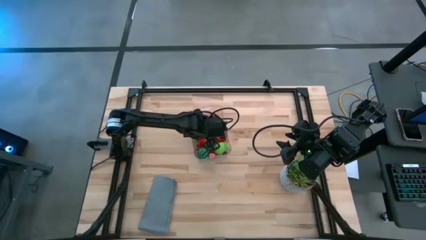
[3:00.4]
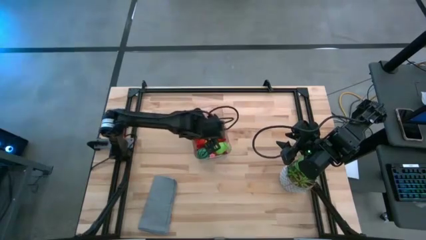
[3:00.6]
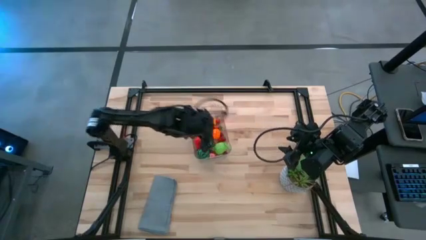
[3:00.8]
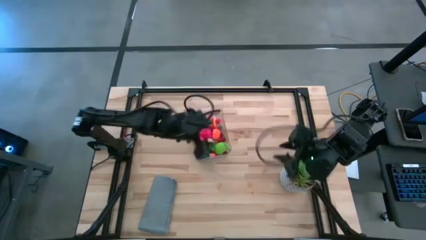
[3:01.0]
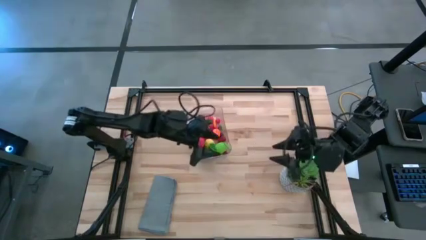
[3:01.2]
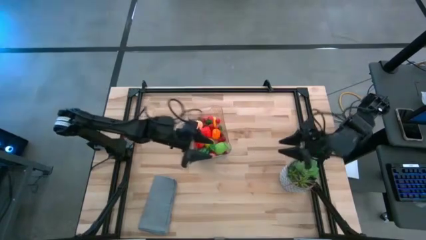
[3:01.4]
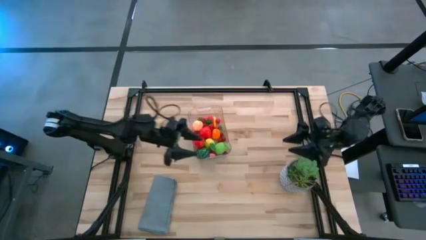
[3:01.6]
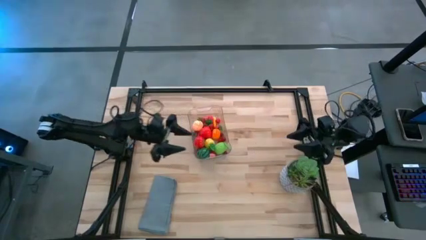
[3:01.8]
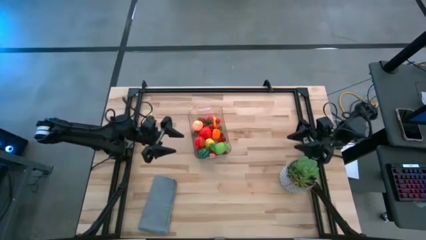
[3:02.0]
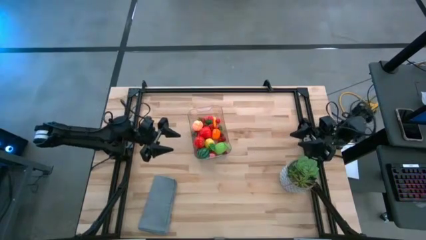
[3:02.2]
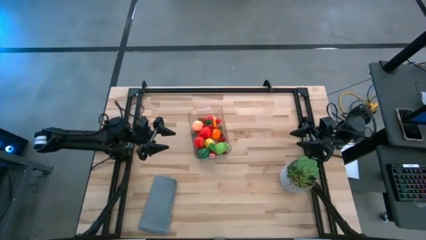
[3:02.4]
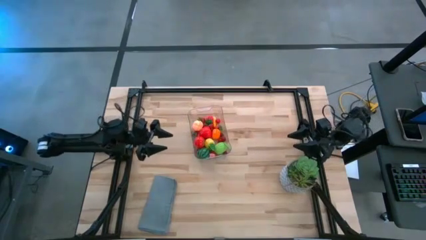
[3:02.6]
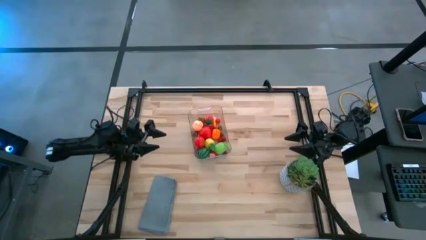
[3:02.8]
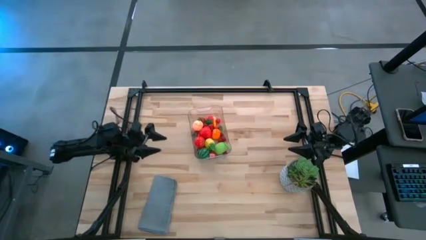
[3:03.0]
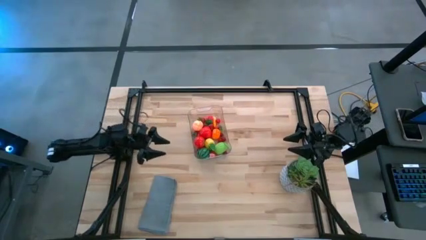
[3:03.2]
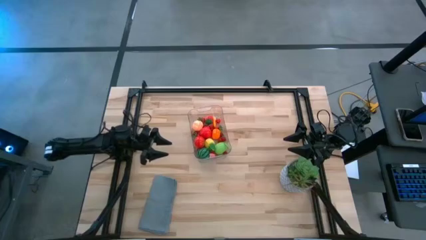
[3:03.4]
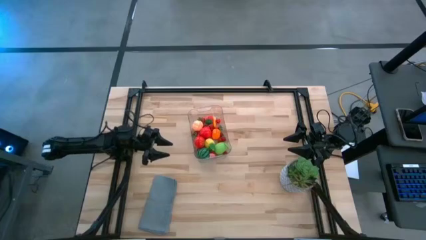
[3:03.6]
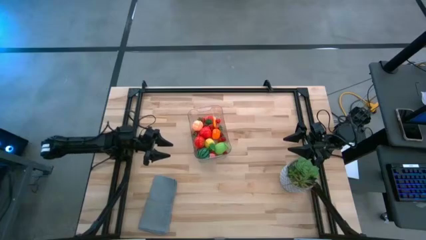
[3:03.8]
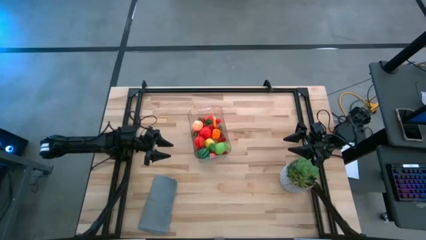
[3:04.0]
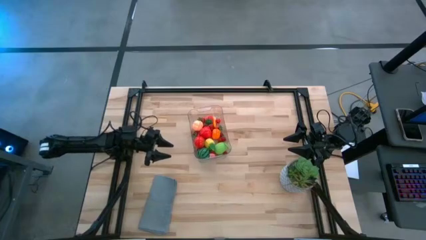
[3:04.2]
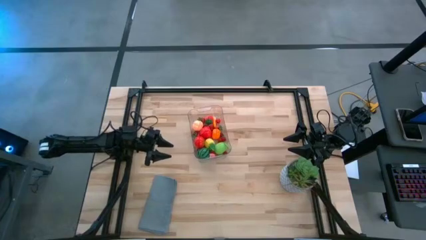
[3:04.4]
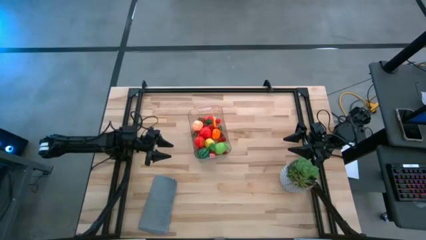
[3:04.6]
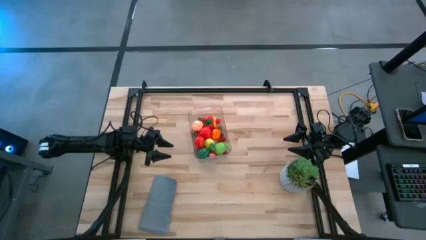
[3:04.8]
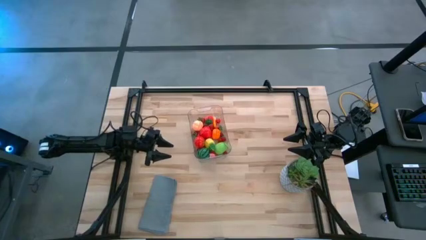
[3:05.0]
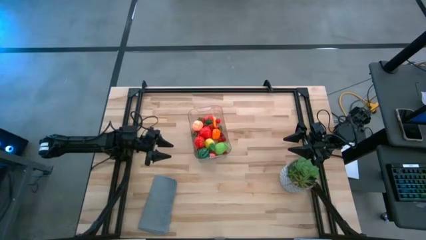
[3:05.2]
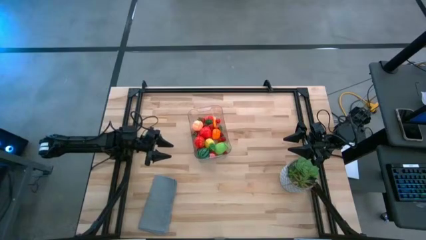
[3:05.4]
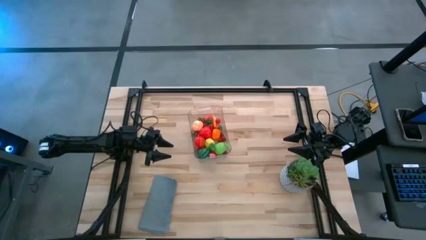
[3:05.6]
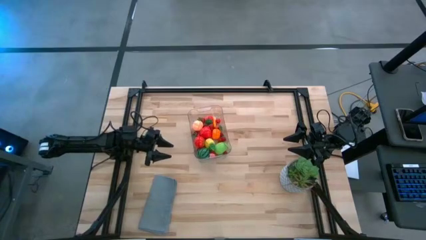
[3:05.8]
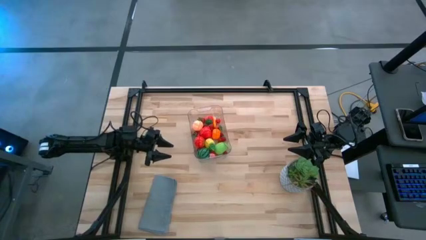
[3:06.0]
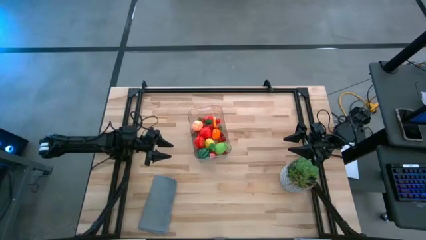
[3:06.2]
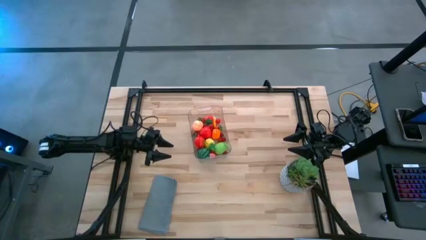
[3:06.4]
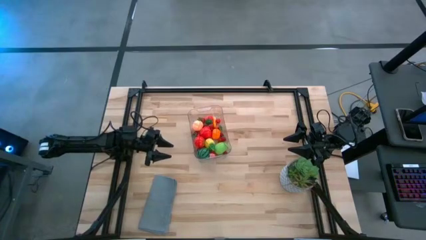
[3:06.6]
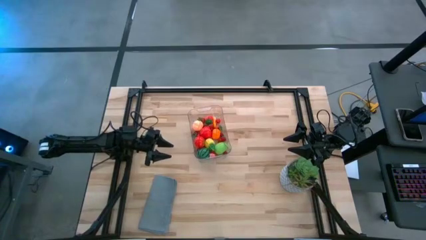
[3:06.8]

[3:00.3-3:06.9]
Task: Pick and placing Produce into tupperware
Return to Home Position

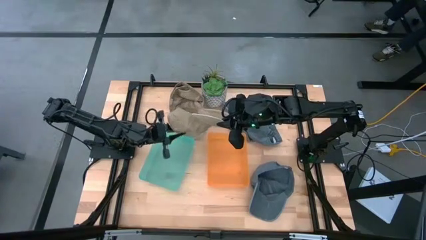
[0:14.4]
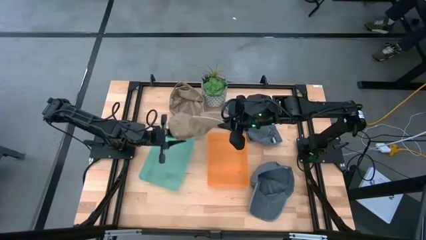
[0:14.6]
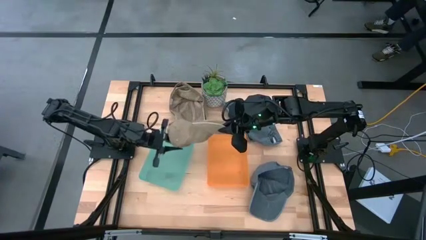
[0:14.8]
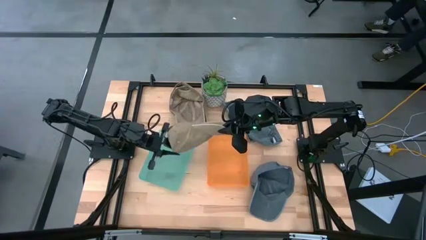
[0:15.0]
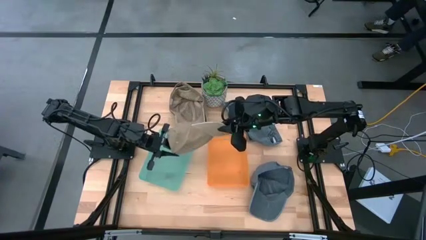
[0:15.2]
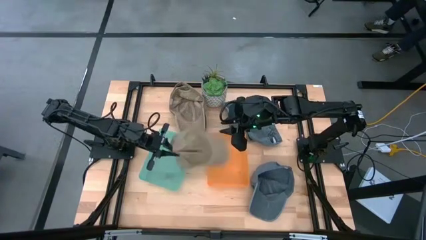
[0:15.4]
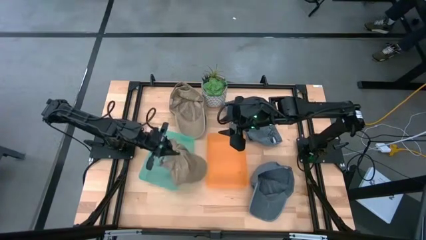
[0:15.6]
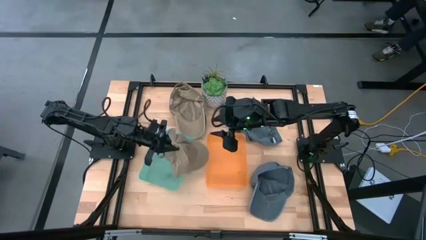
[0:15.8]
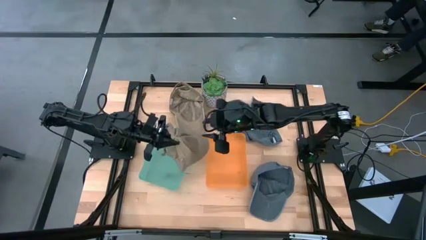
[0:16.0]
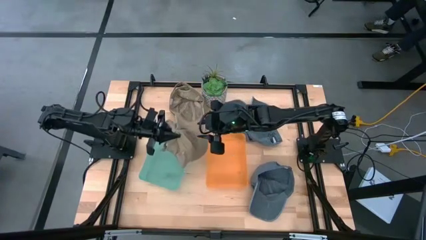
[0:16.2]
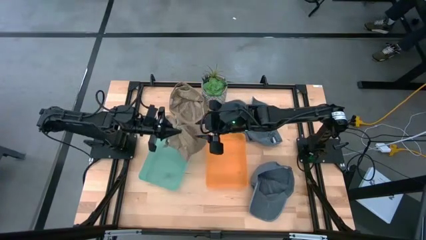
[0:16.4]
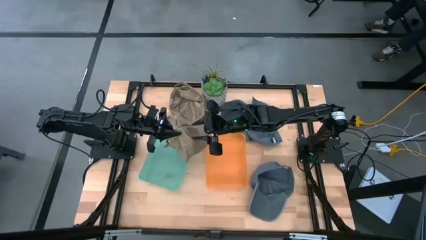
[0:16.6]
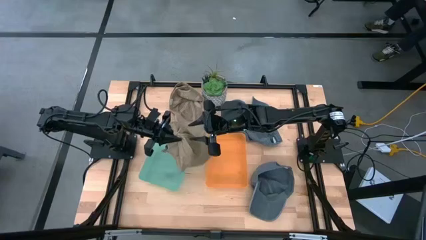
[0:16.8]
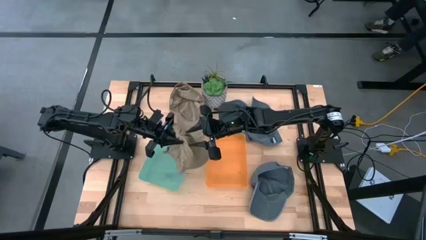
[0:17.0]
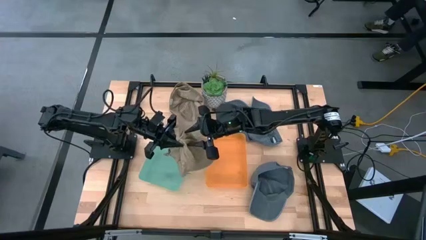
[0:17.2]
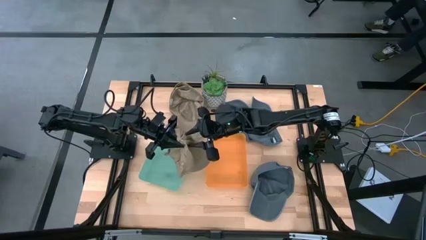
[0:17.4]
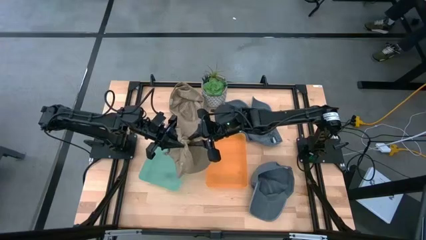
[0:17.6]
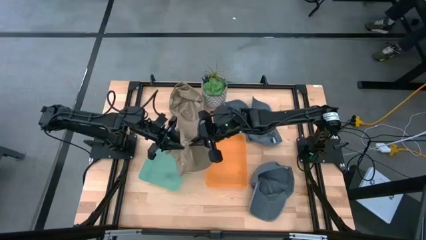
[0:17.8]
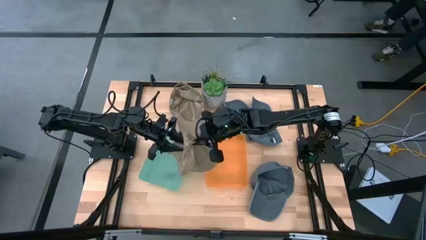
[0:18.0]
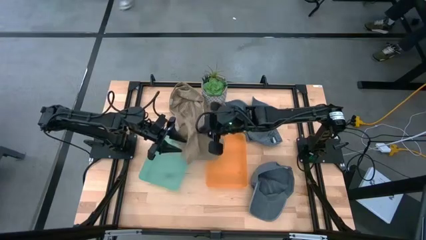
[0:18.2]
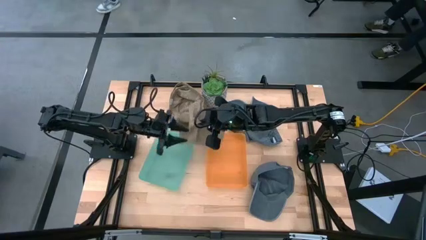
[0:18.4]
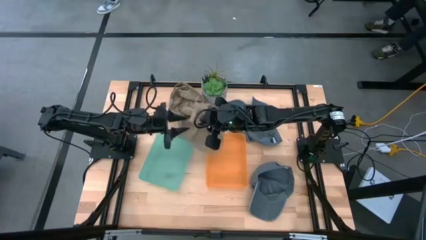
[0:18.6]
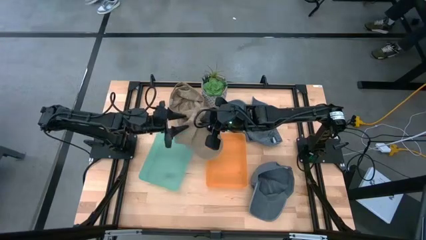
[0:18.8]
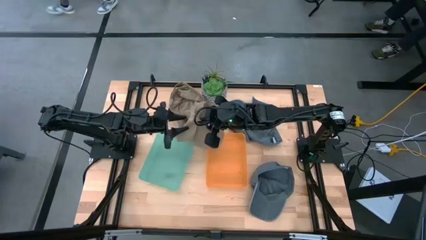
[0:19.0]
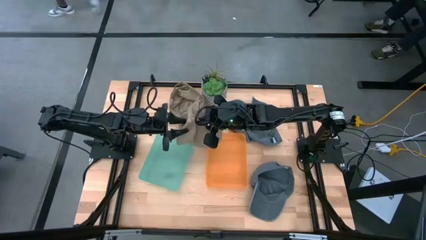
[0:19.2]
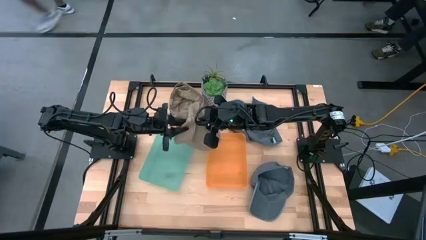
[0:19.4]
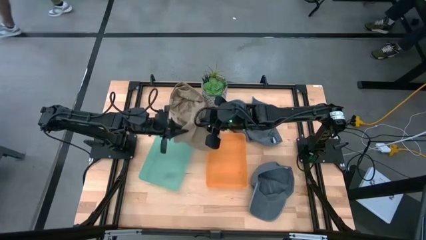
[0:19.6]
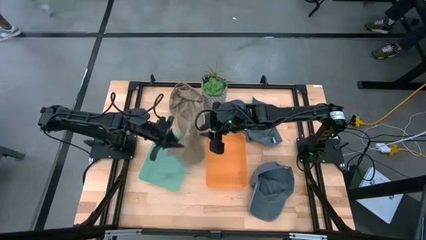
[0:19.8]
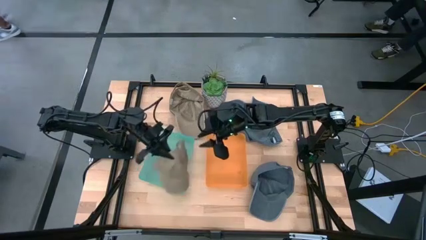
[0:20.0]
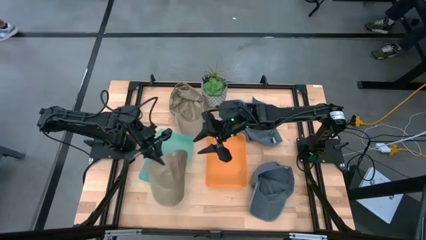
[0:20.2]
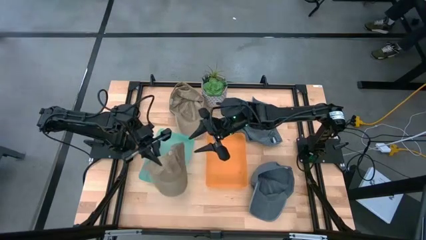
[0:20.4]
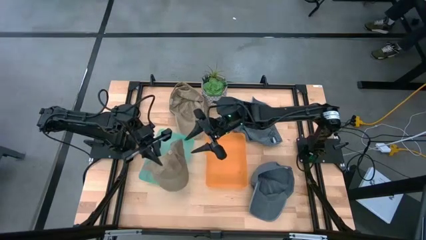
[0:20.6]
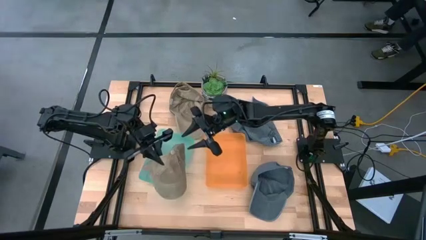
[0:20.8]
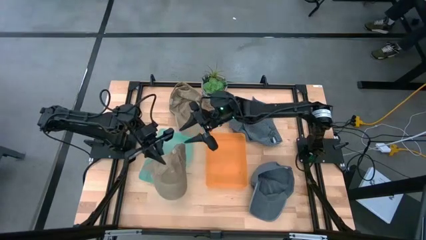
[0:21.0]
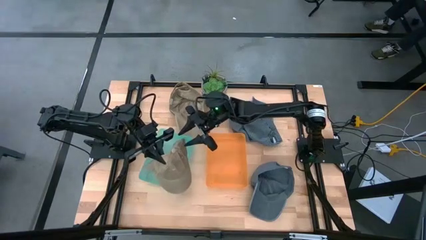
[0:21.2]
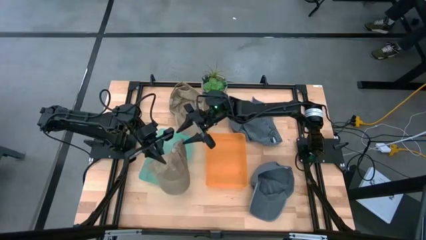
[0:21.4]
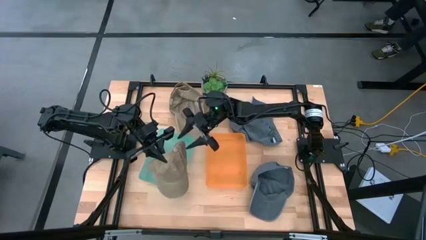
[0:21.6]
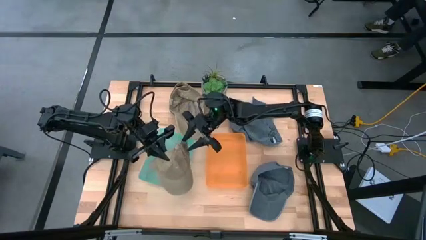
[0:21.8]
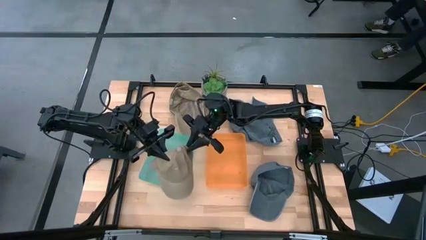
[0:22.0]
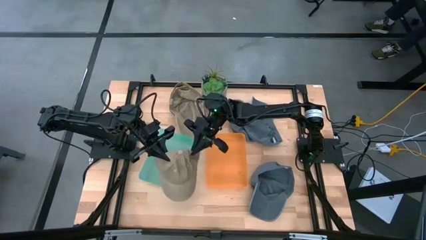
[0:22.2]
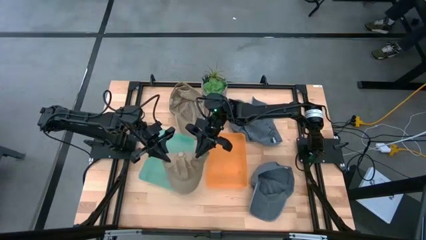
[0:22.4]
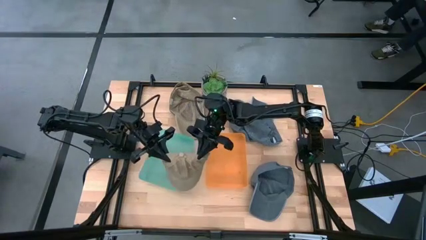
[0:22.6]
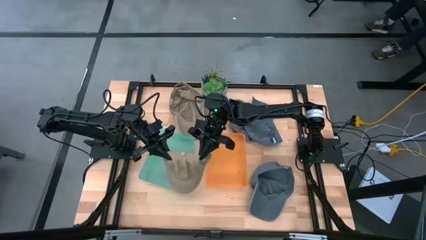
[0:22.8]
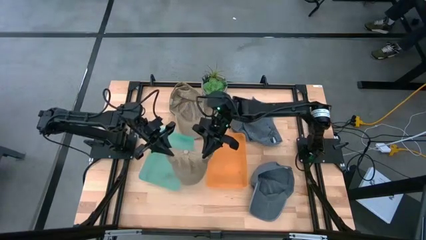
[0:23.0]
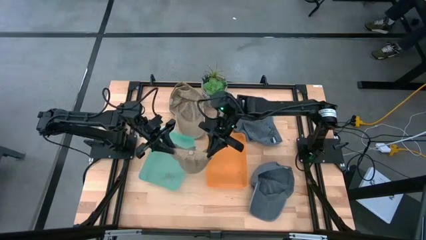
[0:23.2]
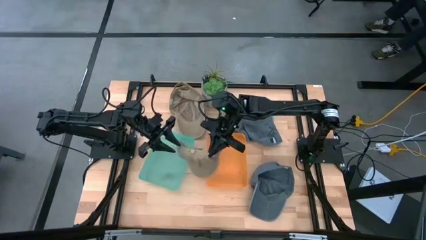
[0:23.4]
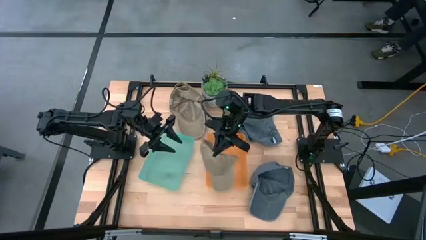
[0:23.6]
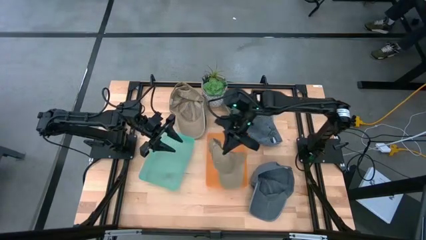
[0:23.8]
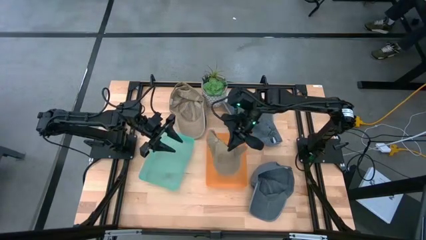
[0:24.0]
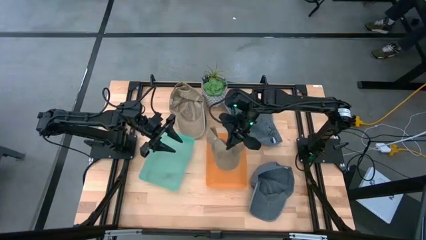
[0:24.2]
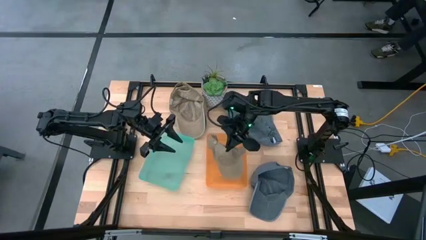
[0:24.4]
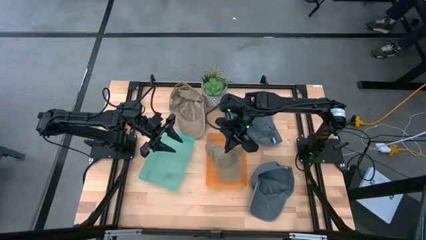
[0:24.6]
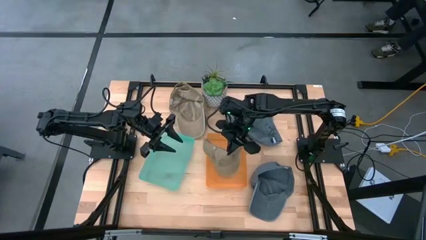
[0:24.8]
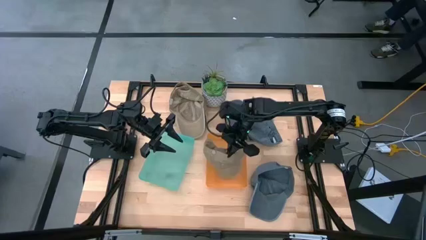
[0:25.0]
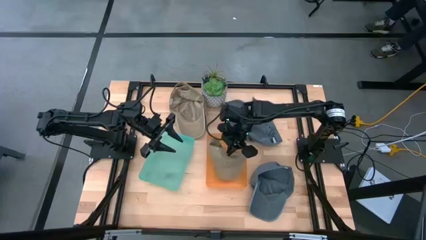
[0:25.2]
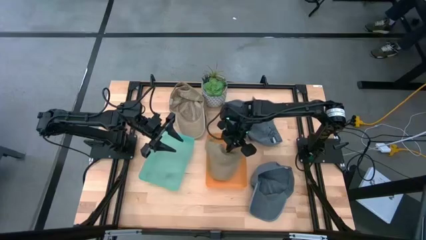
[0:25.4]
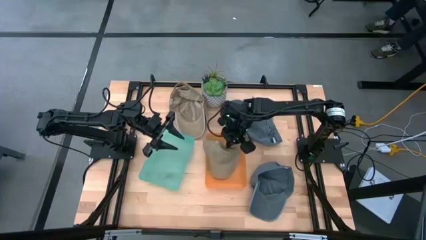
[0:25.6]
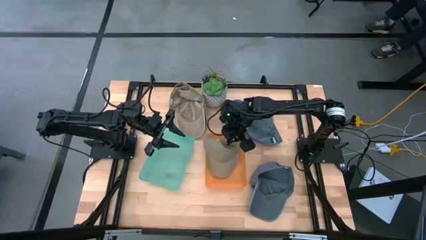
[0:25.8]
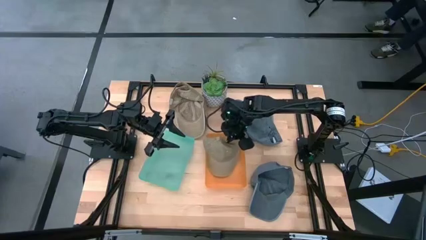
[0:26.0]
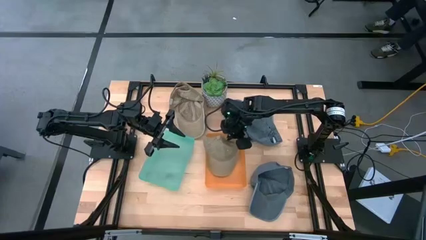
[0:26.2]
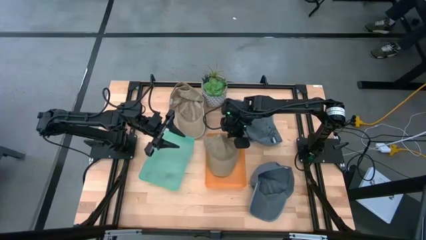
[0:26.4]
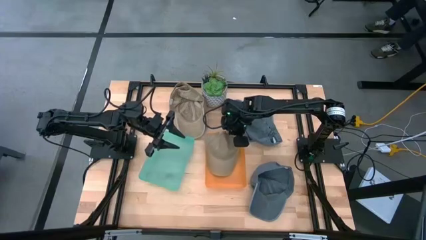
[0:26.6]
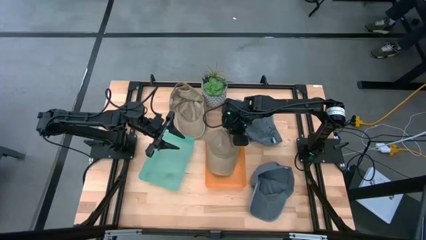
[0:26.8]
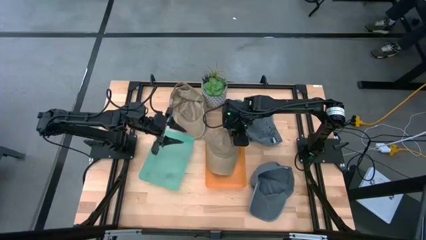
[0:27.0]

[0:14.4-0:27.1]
Task: Pick & Place hat
Put the right brown cap into the orange bin
